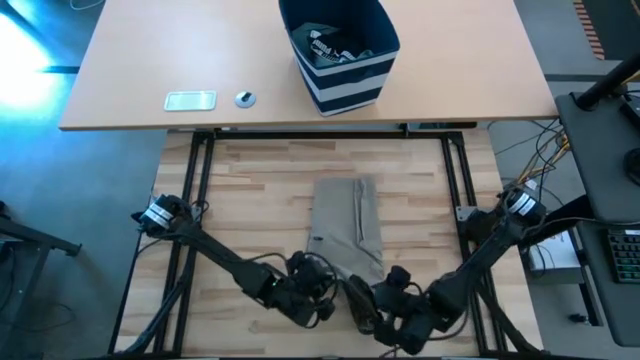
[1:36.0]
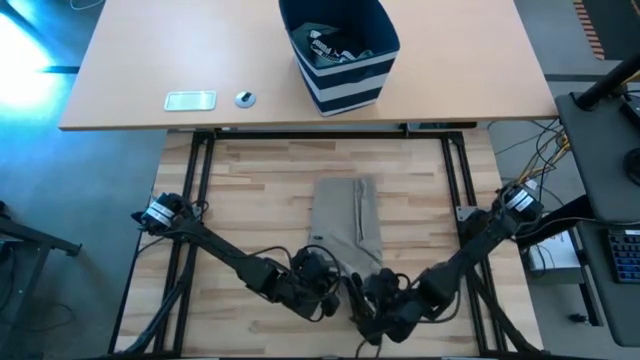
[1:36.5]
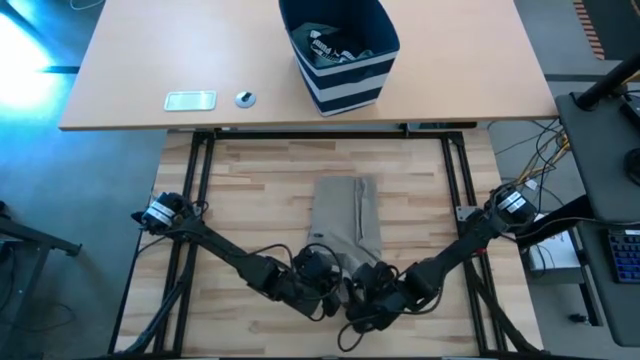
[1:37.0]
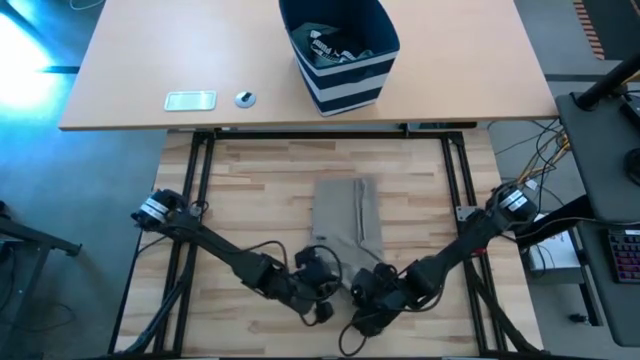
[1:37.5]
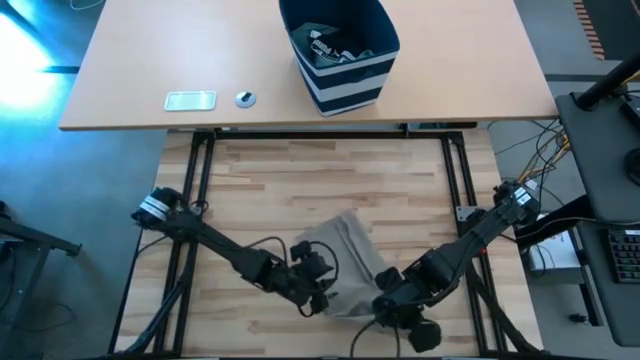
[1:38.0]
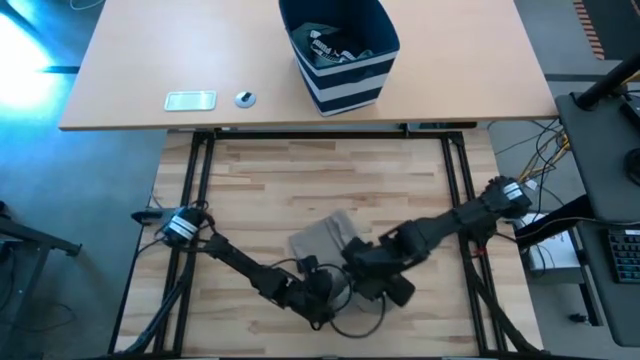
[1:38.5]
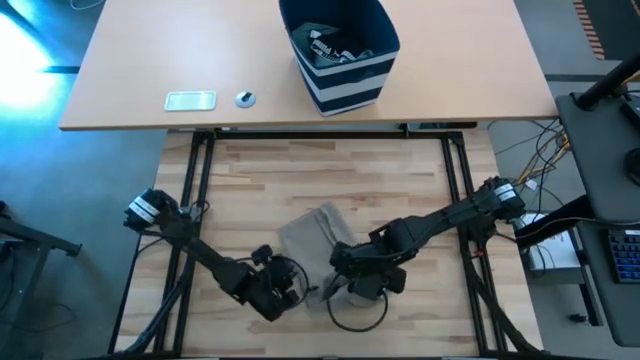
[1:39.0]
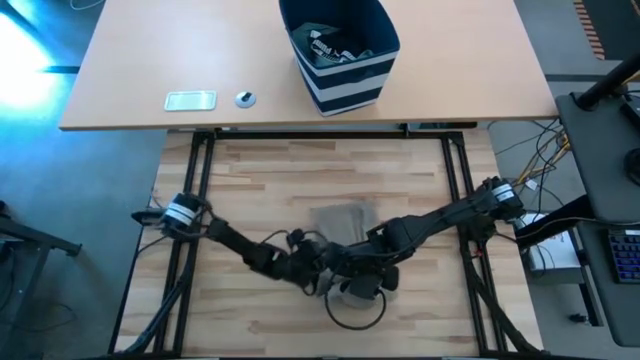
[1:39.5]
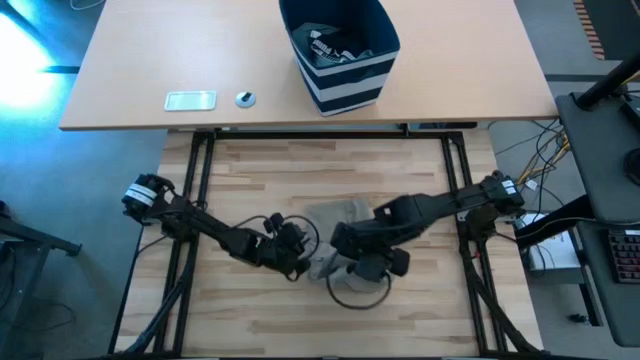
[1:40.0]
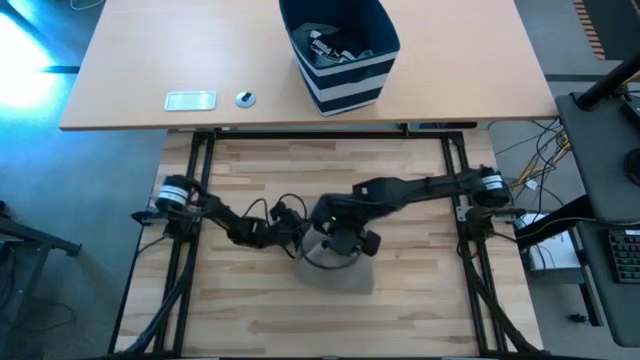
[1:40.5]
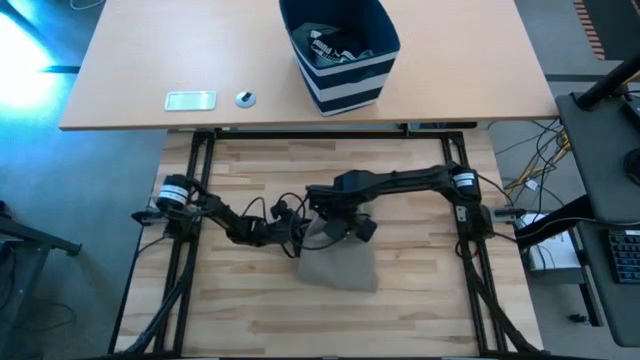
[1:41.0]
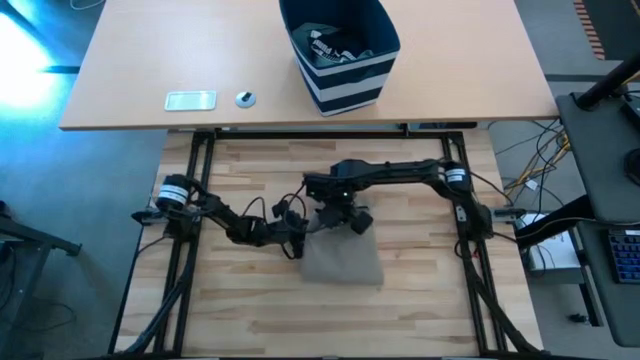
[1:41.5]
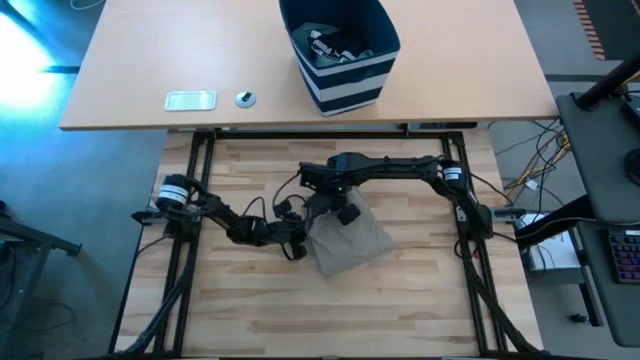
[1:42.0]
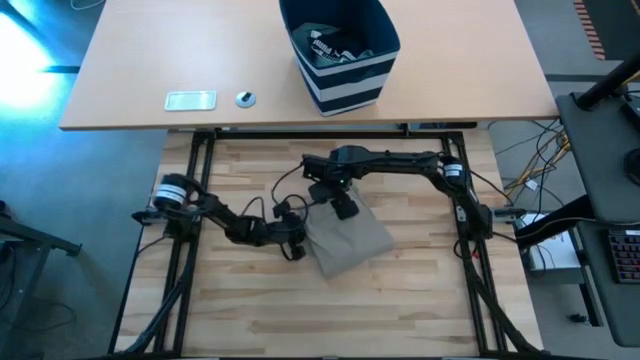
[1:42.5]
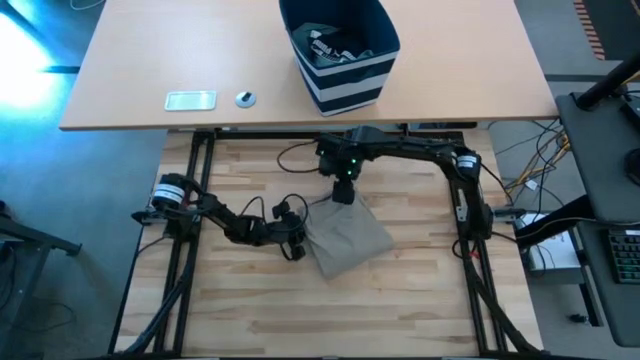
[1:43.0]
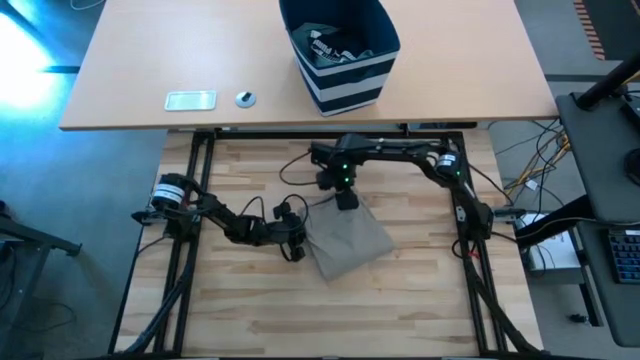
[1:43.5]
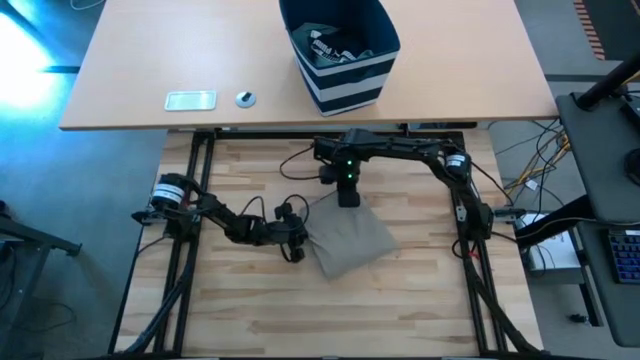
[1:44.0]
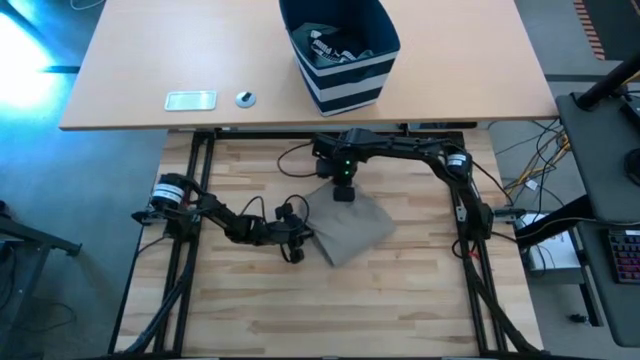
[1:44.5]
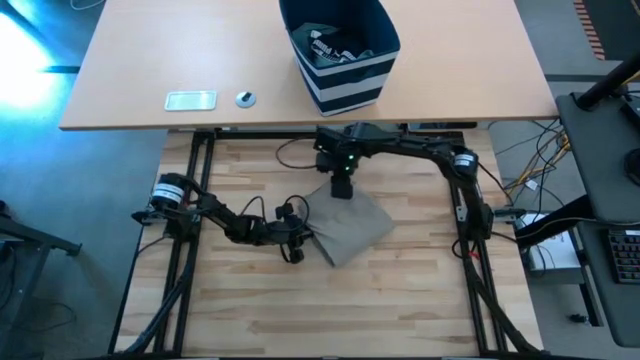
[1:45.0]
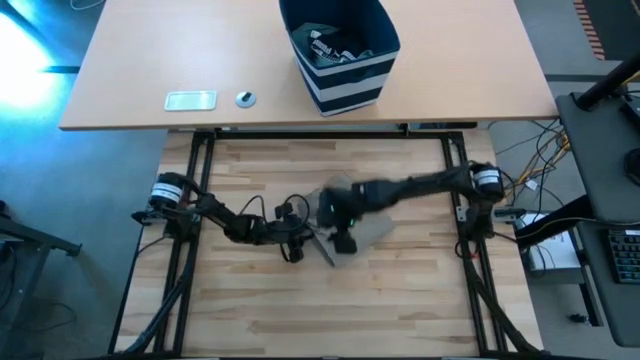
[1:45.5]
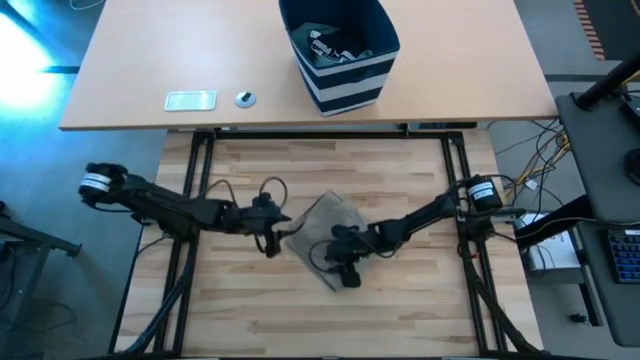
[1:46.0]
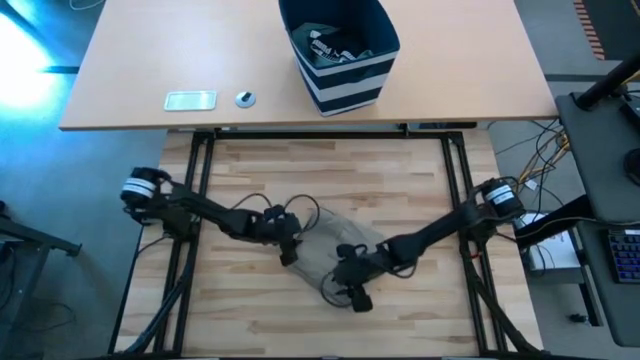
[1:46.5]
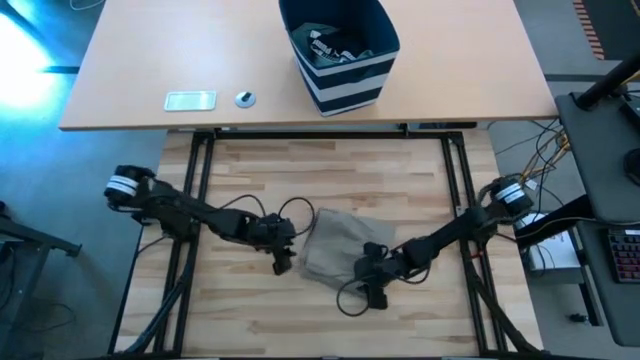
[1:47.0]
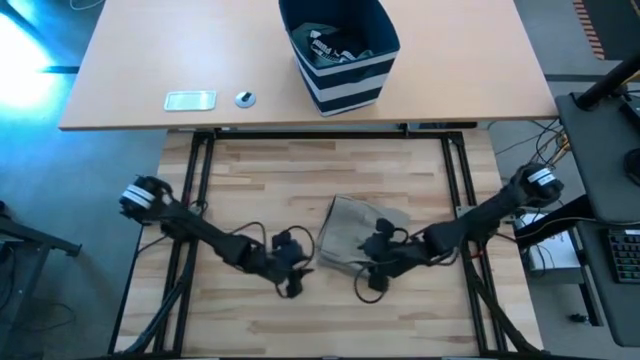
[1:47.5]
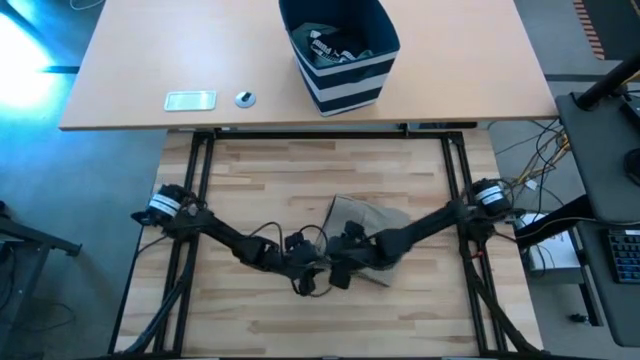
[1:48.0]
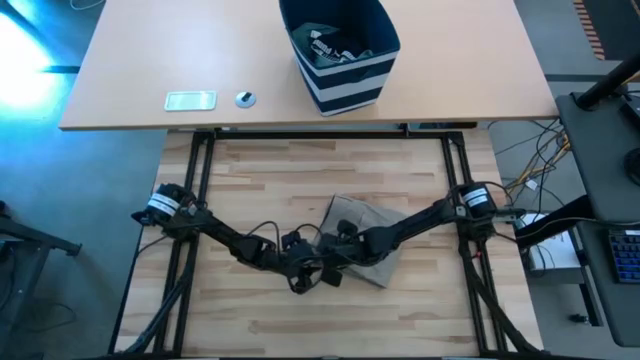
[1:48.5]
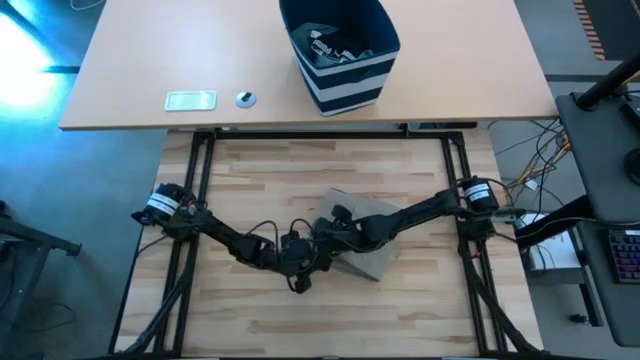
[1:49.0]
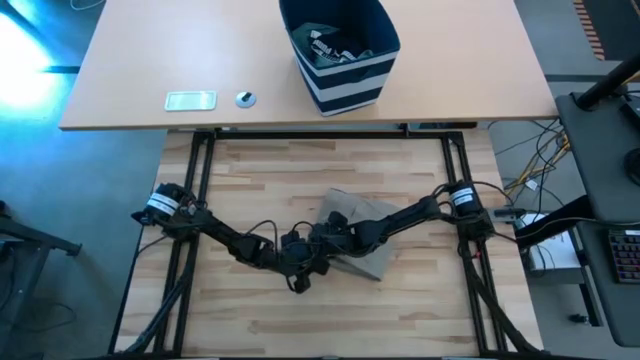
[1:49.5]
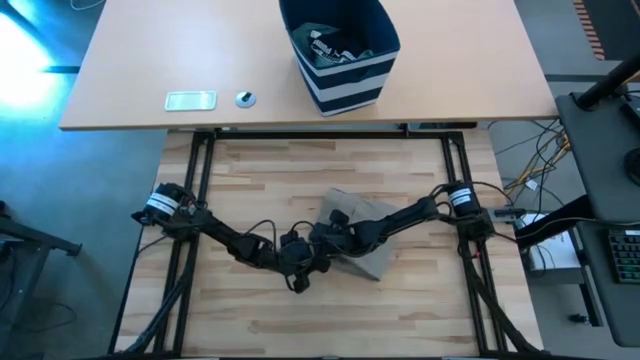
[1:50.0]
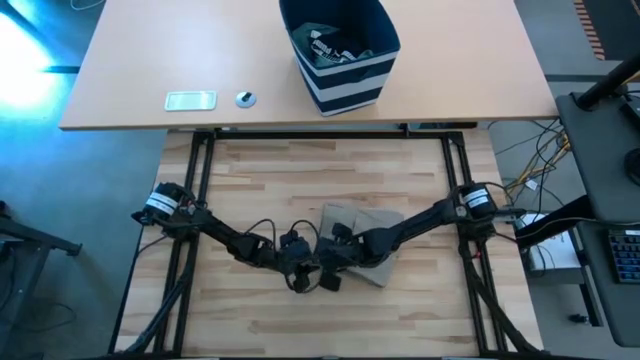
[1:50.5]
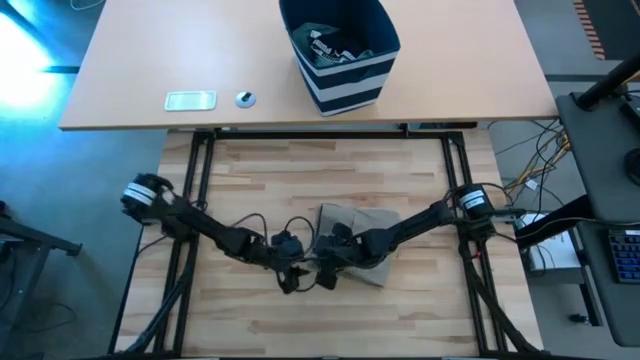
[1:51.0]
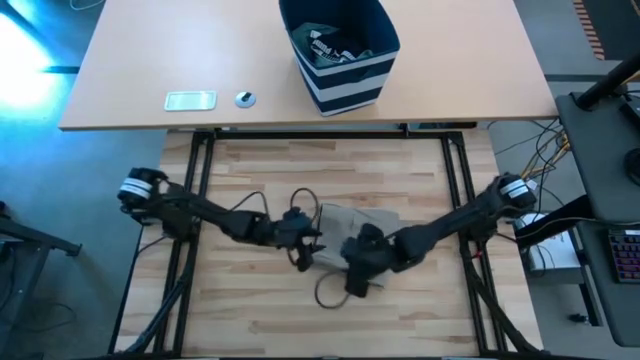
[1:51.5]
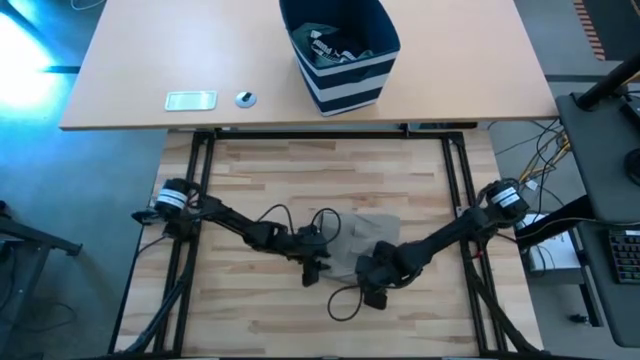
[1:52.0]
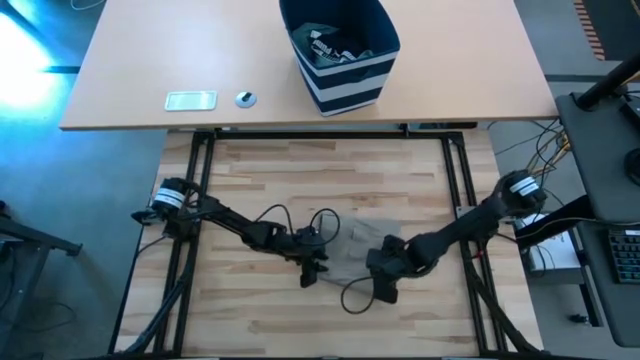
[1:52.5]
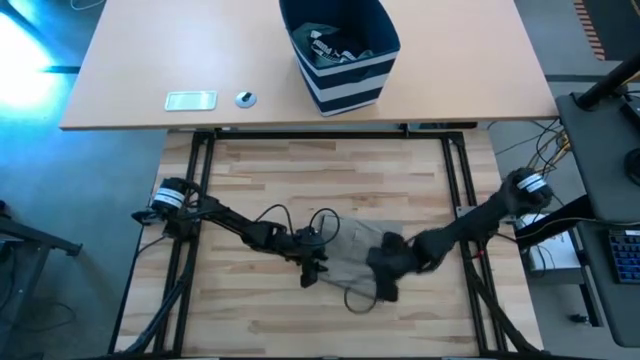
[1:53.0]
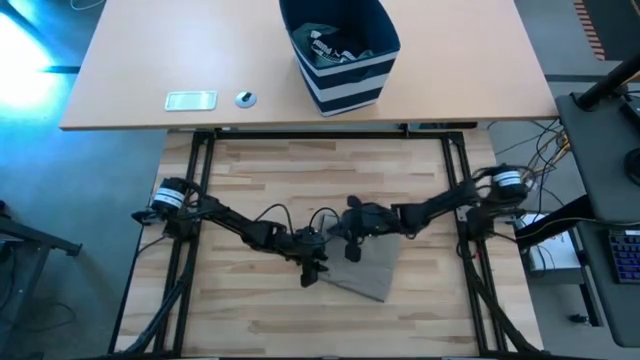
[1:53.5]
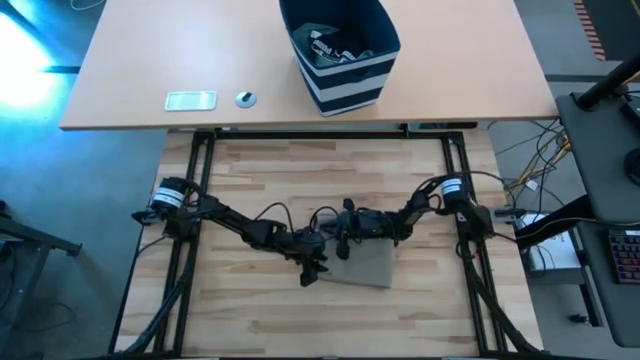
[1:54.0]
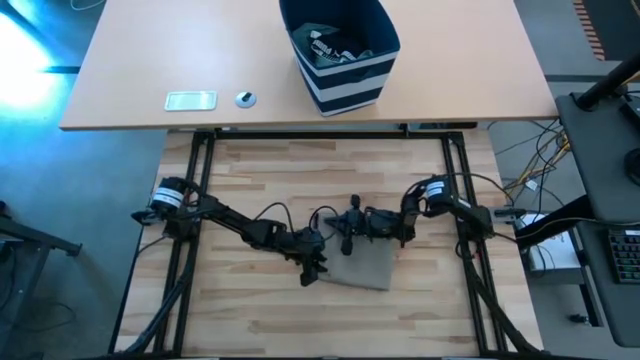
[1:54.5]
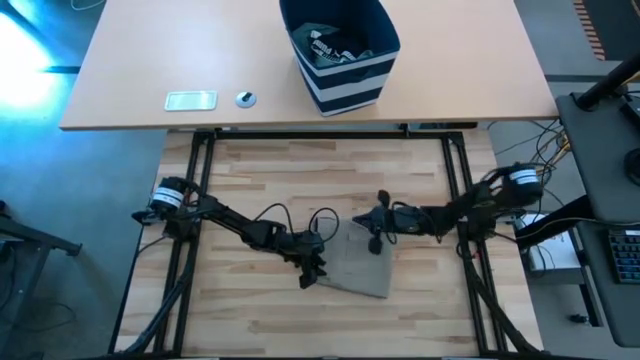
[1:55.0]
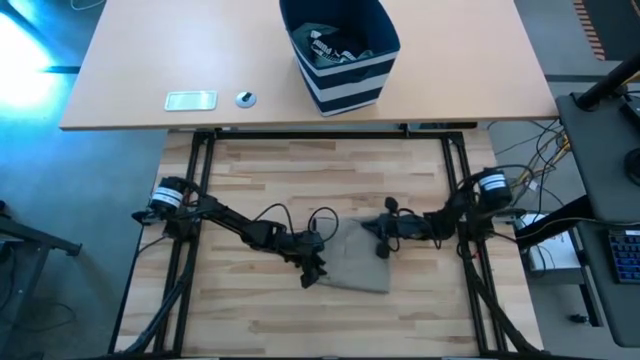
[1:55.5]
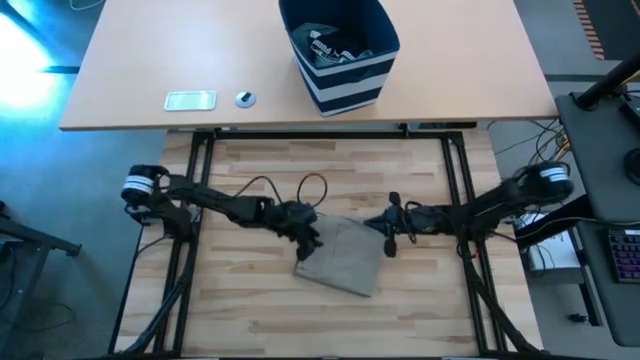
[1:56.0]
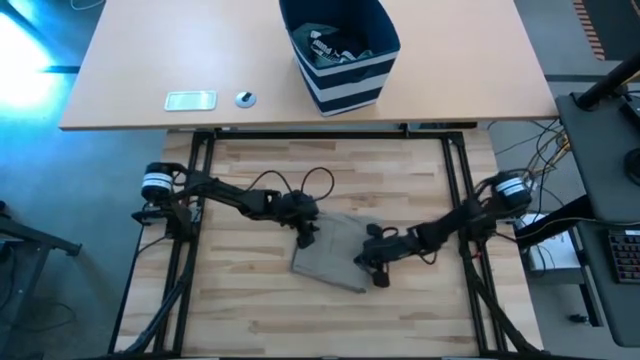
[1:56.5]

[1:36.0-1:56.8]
Task: Fold Laundry from Bin
Fold the brown shorts

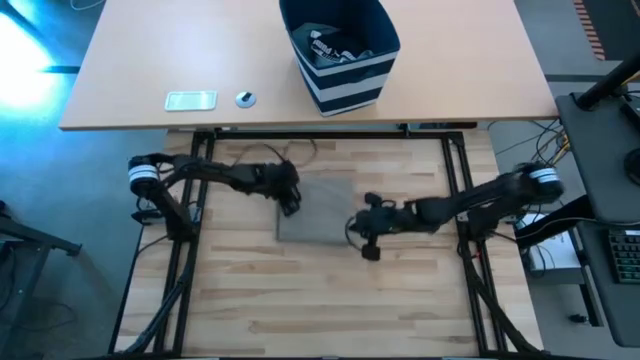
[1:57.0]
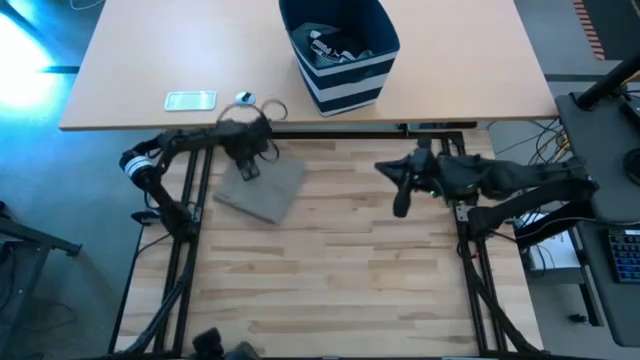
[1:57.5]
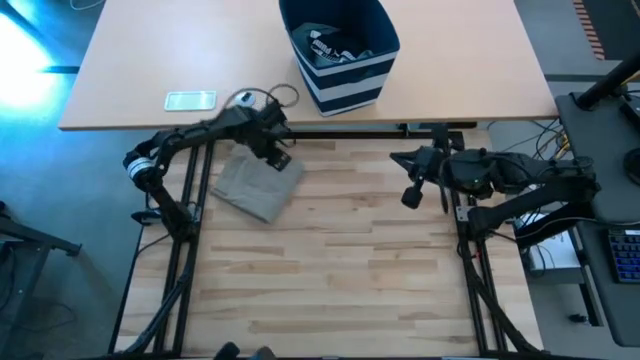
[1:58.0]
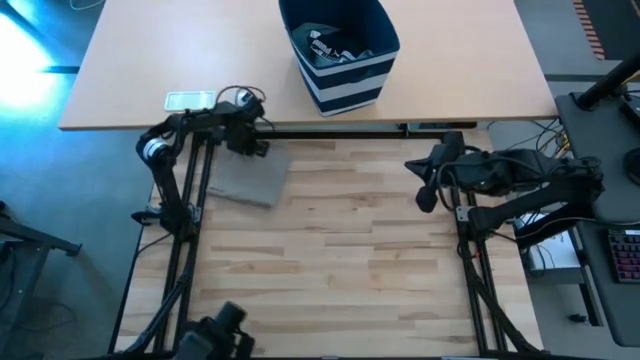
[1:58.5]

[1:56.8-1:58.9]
Move the brown shorts on the top left corner of the table
